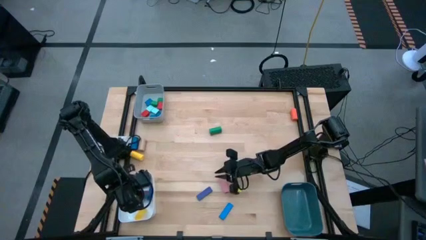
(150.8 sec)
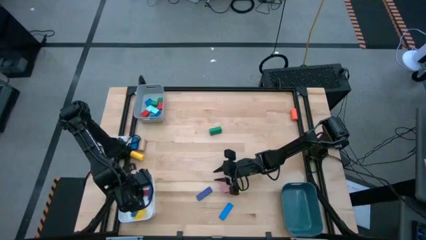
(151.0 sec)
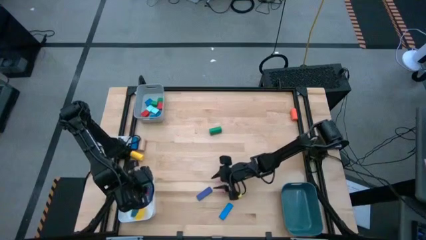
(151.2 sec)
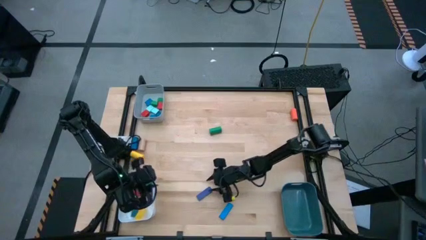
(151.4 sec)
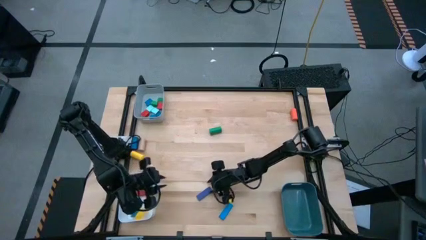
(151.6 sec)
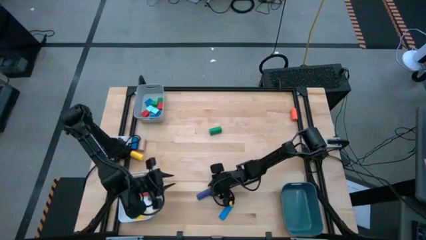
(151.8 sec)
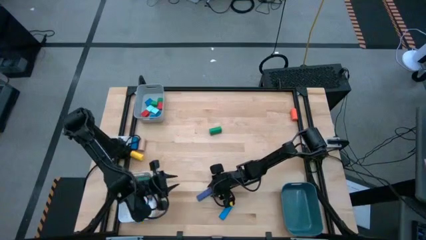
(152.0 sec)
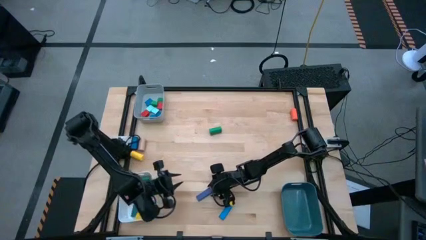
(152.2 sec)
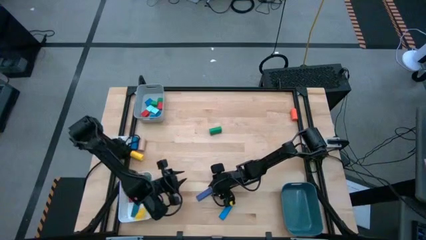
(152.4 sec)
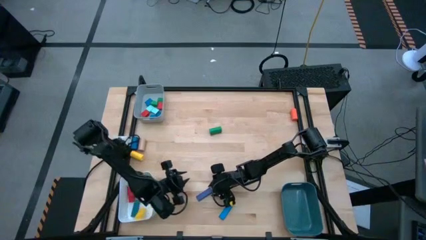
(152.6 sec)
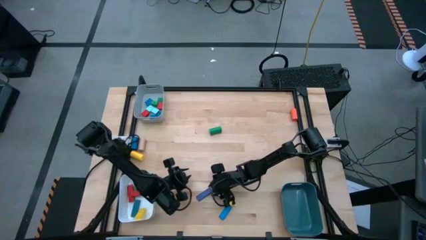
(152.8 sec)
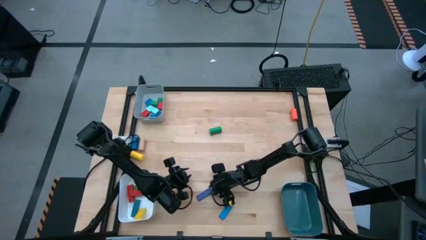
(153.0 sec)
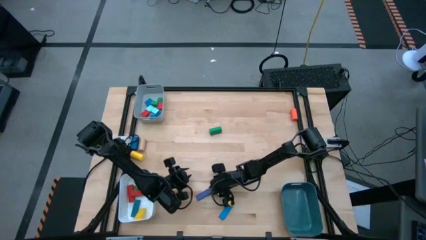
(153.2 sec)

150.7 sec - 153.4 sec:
Task: Sort blocks by size
Put the blue rectangular block into the white bin

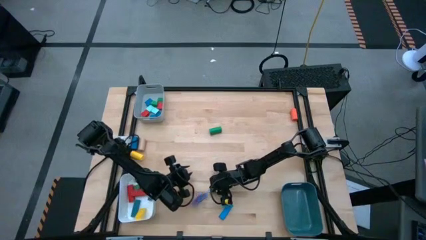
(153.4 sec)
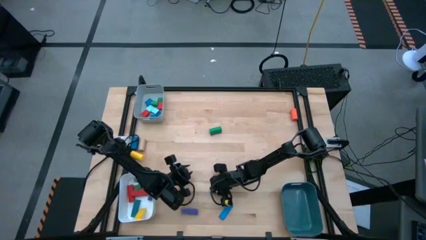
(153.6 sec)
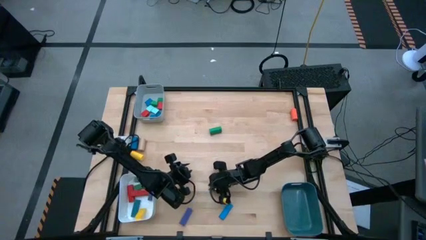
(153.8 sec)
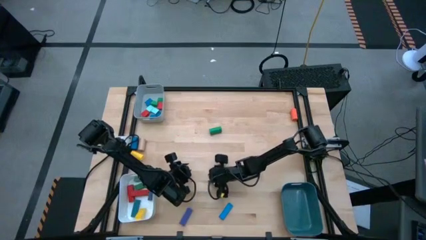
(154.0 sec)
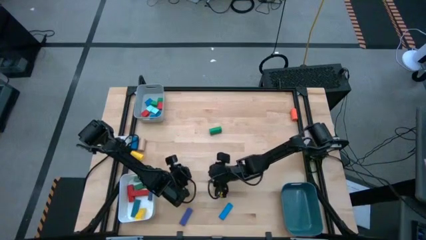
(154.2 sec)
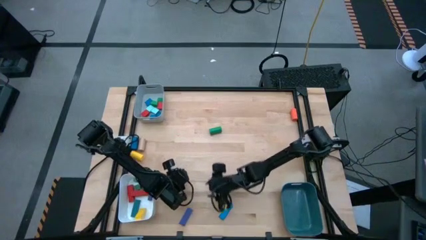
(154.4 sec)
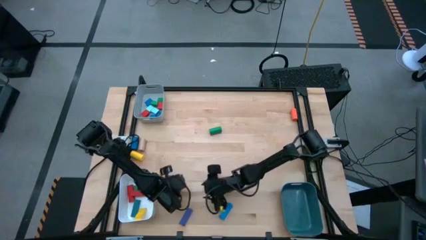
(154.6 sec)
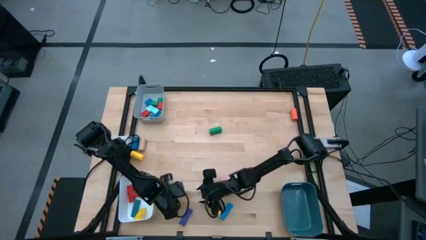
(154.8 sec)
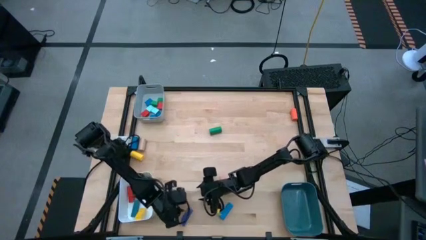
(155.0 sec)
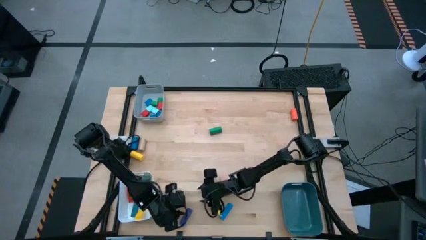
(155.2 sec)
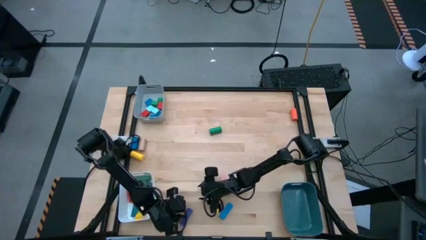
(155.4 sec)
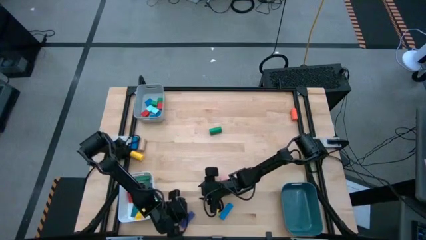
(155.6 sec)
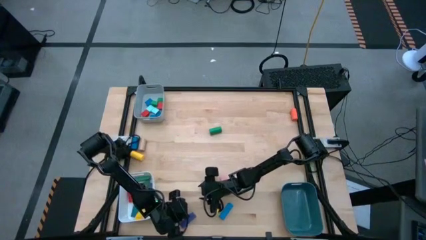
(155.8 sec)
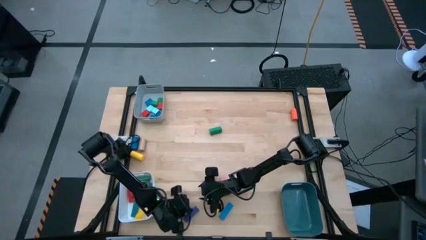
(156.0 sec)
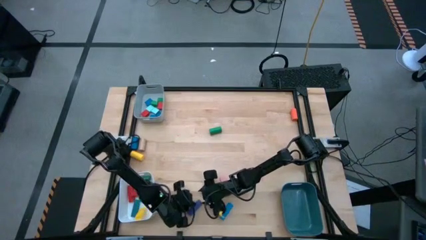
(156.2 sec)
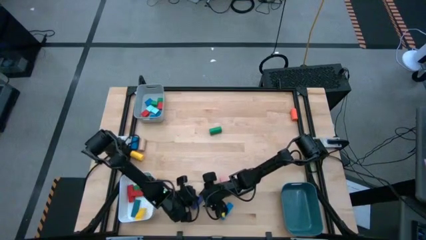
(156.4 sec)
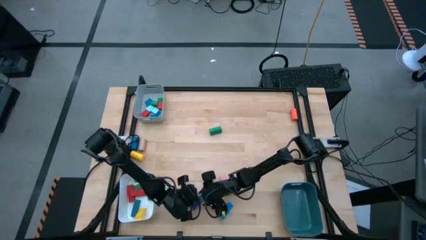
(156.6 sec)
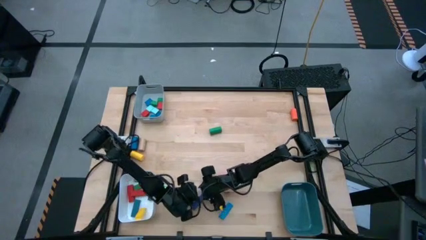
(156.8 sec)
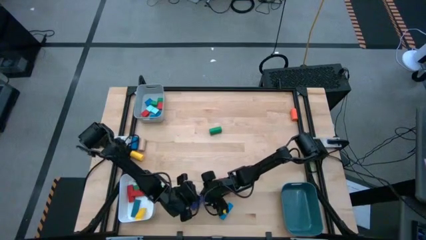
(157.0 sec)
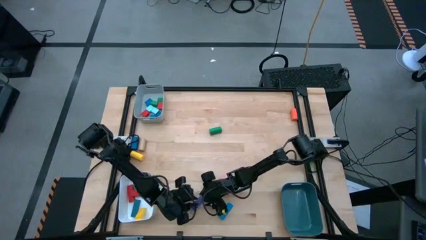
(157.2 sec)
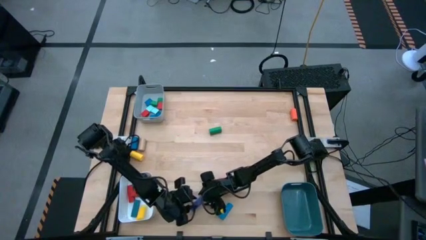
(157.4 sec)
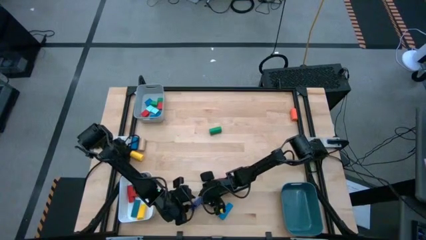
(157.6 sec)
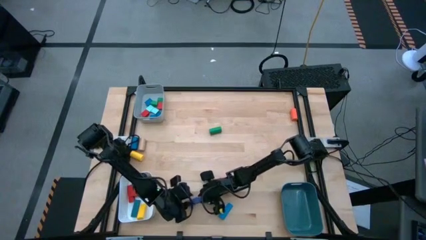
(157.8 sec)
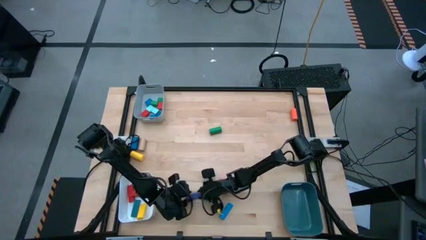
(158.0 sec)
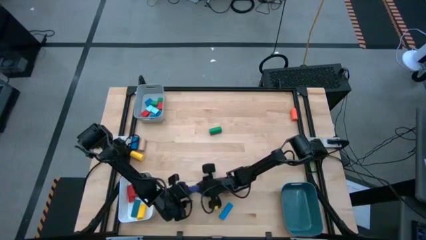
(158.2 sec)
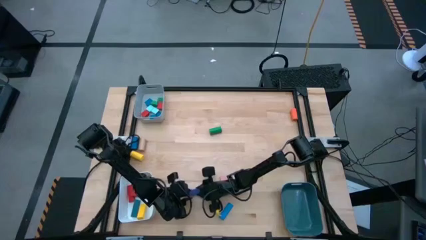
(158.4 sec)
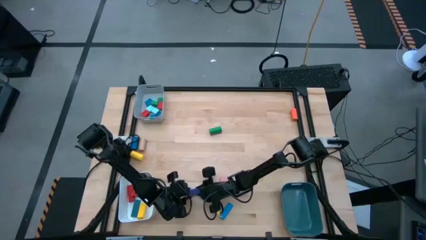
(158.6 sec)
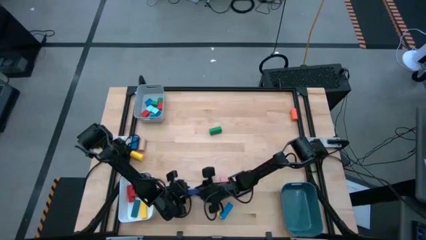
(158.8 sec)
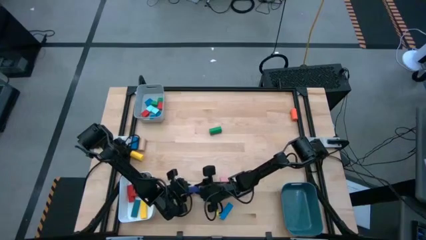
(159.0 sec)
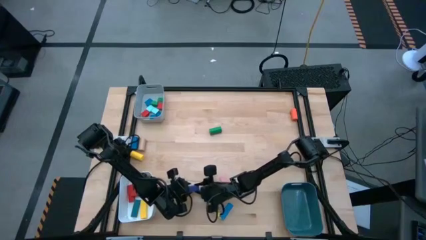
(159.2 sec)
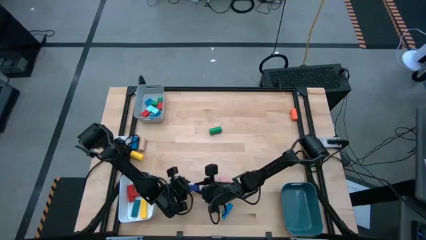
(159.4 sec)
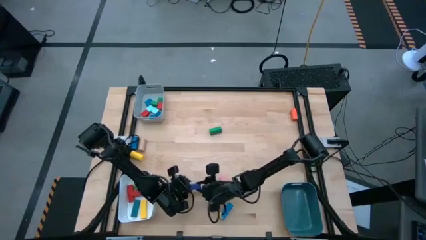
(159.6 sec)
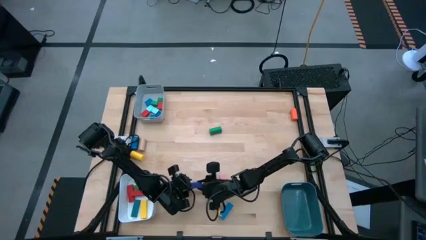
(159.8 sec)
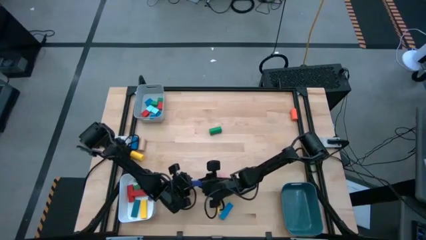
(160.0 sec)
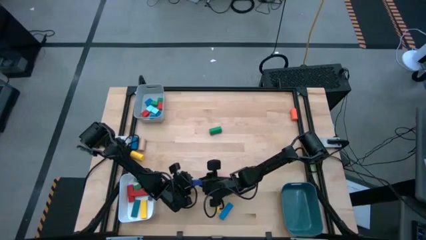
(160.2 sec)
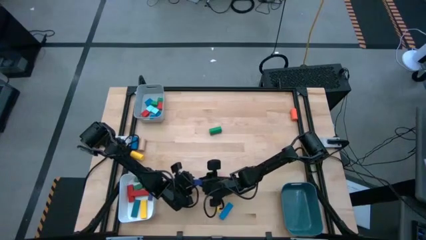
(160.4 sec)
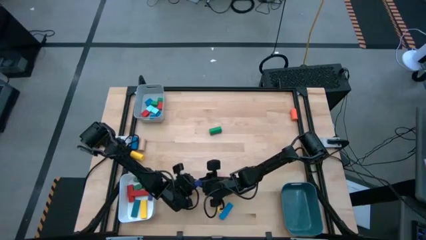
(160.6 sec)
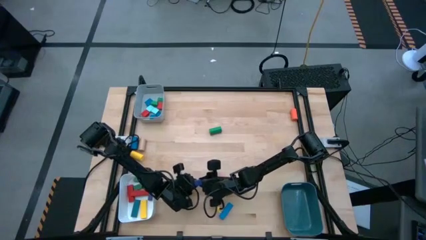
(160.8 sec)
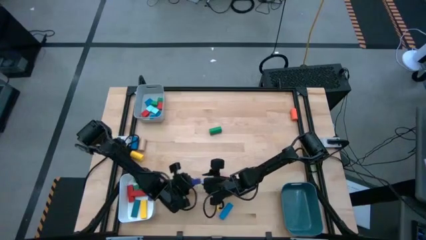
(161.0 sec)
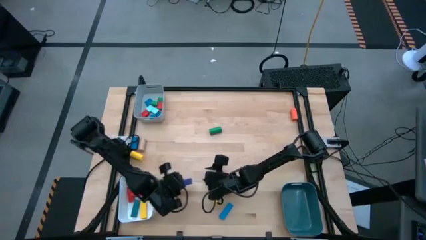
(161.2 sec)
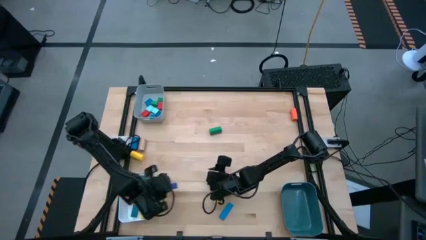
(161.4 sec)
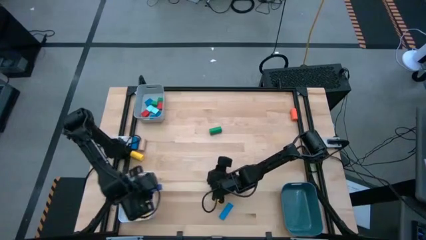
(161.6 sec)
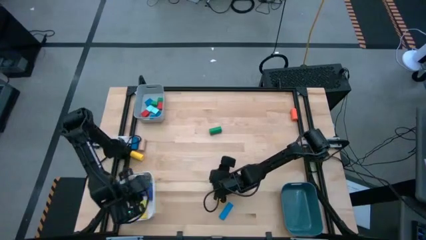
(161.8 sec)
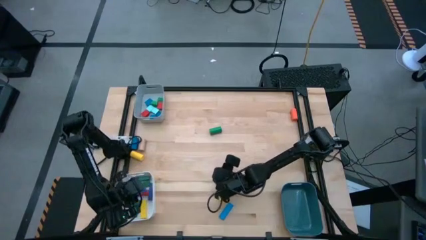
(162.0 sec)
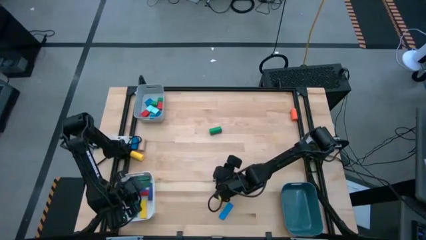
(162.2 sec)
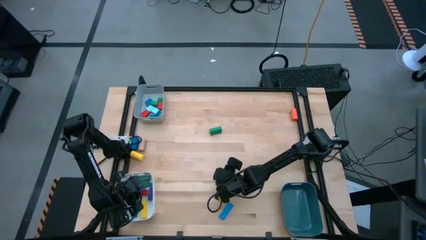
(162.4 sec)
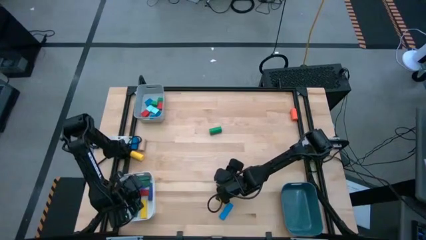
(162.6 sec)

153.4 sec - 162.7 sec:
Put the blue rectangular block into the white bin

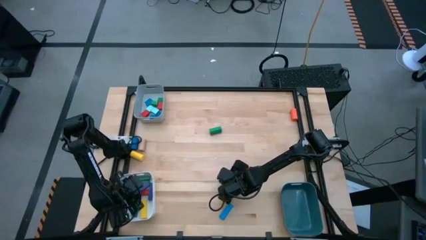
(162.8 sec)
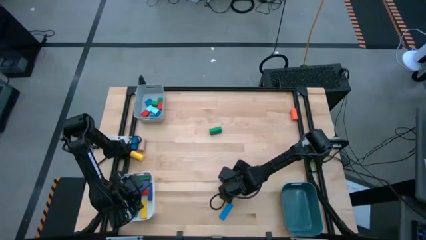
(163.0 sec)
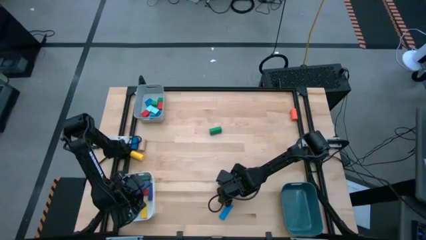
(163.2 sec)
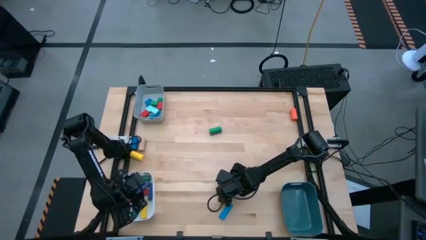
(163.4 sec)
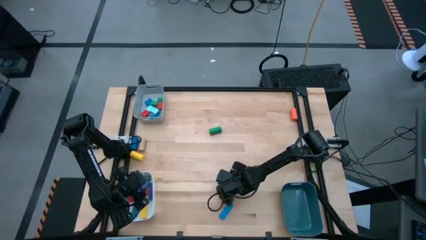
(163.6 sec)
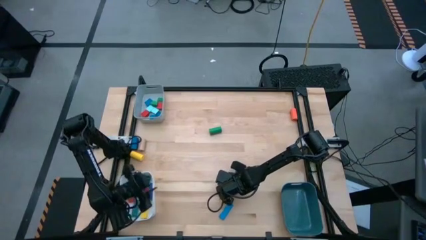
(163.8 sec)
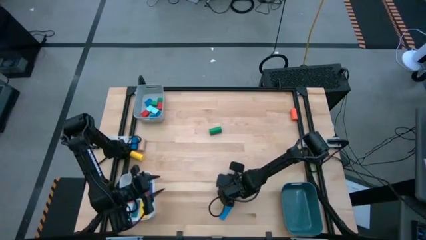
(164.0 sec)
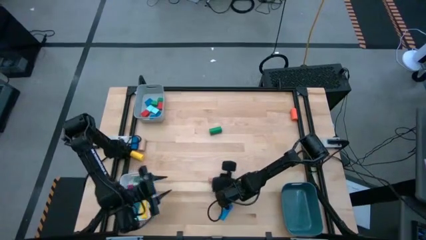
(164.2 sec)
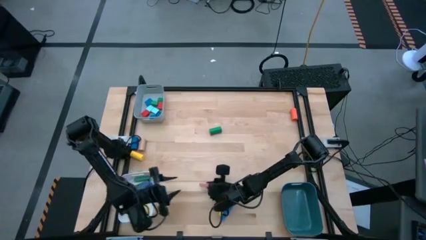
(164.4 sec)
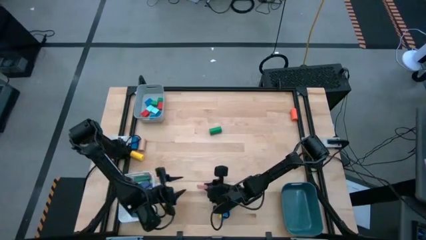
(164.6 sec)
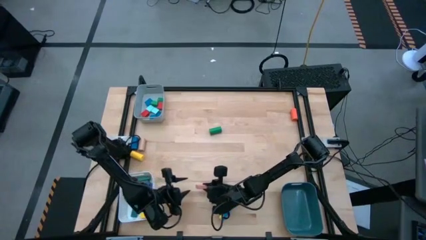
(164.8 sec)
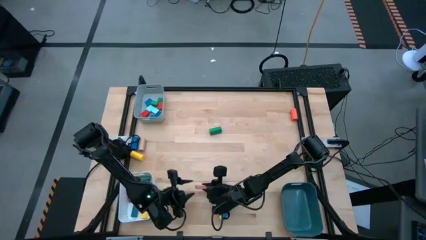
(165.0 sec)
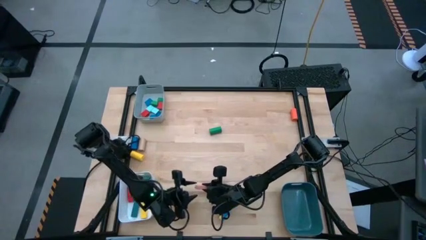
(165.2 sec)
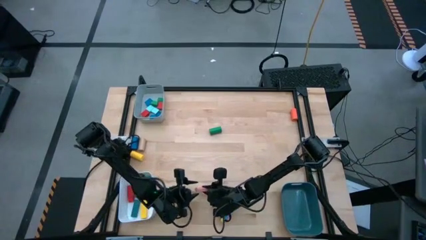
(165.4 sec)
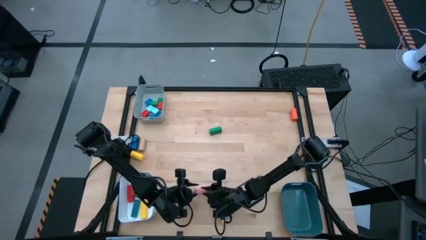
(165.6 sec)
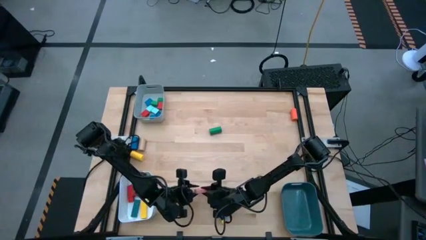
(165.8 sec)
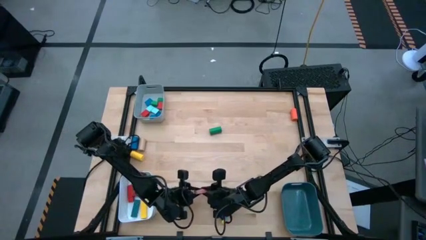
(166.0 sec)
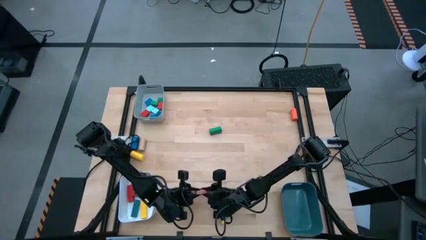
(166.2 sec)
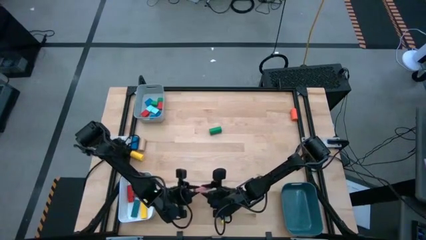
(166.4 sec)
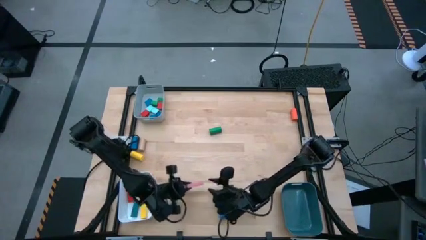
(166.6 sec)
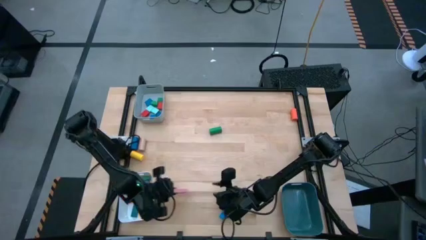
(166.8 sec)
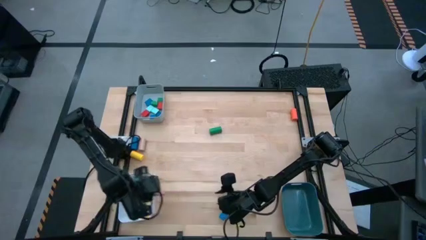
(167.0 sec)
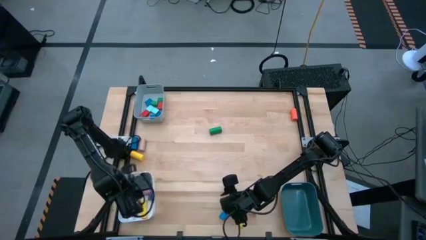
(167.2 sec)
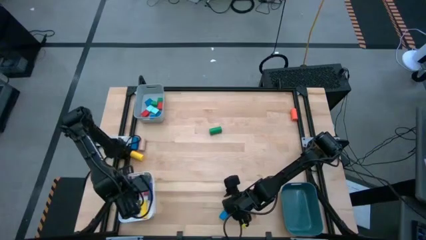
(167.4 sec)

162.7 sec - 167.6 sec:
Put the pink rectangular block into the white bin
